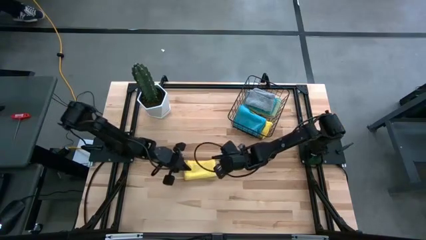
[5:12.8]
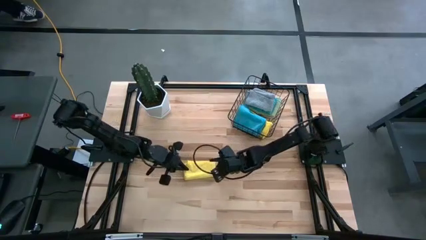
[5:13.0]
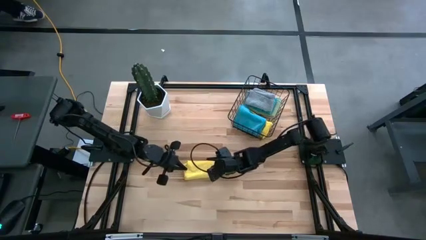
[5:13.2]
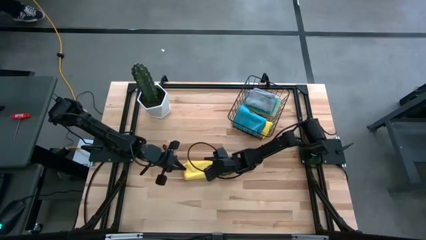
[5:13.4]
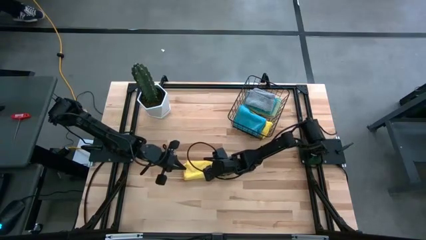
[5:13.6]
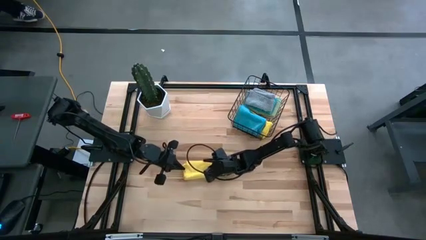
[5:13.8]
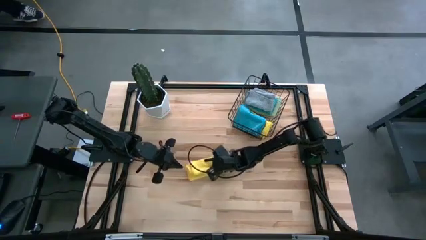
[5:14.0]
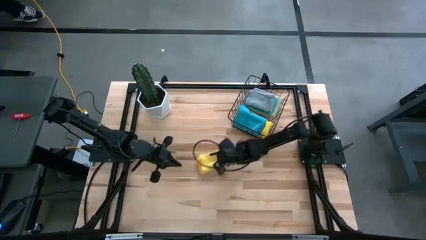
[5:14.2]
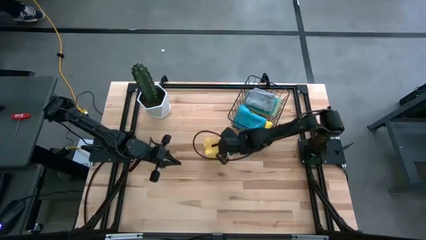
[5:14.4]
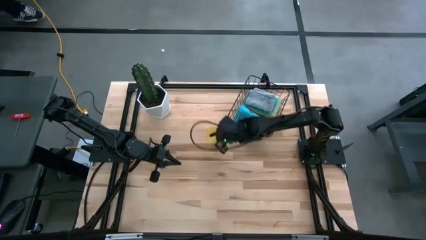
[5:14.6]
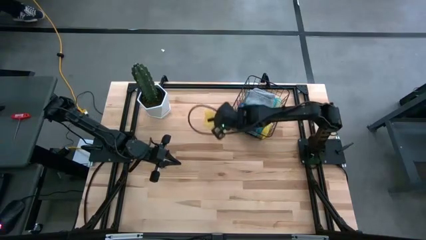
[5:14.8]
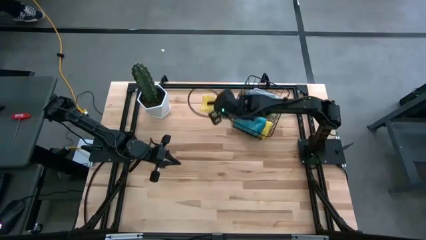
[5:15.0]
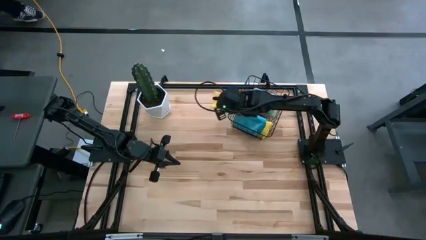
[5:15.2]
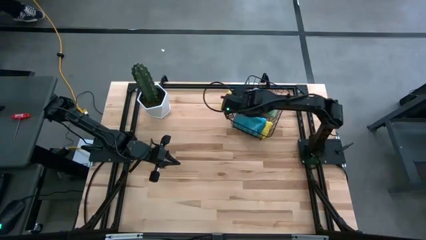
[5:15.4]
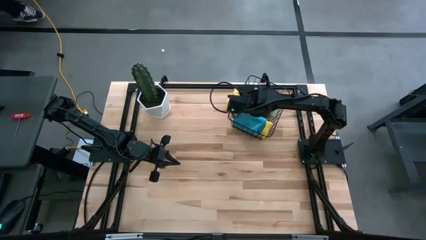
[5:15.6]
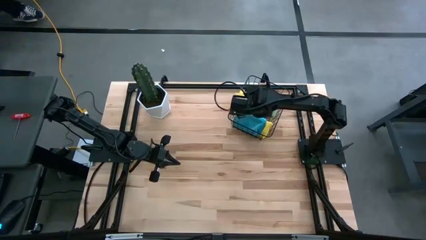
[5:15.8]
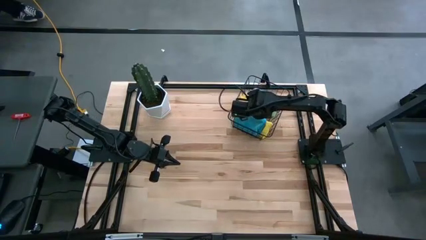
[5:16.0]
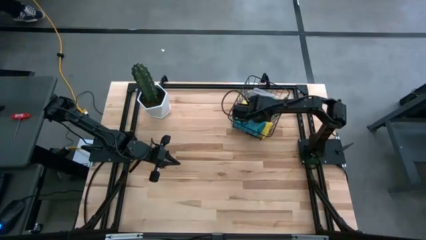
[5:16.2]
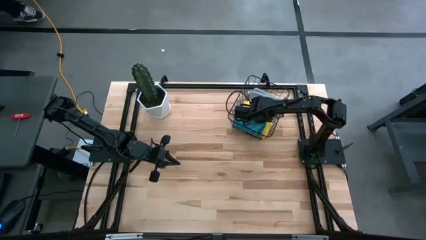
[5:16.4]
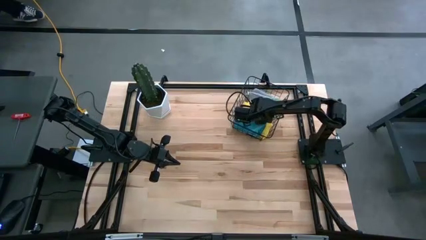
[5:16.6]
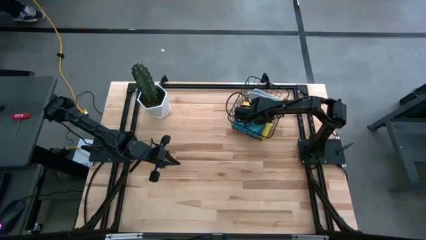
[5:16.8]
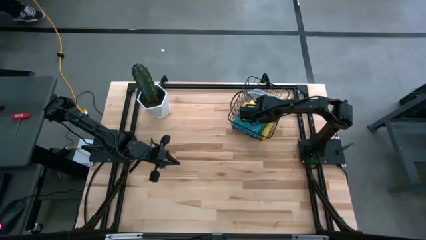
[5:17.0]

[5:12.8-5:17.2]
Task: Fold microfiber towels
Put the folded yellow microfiber towel into the black wire basket

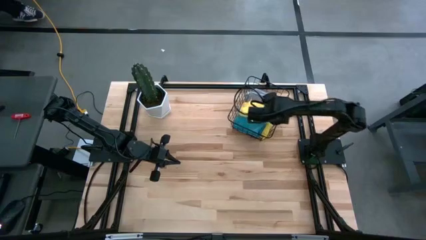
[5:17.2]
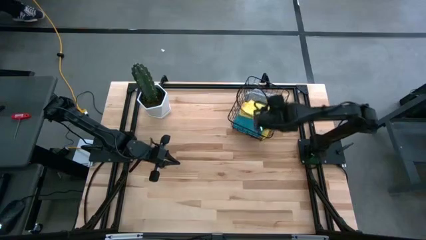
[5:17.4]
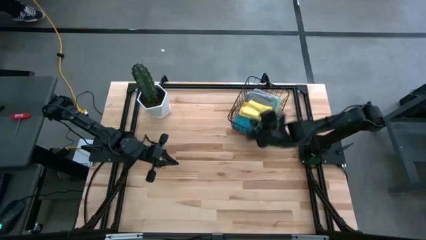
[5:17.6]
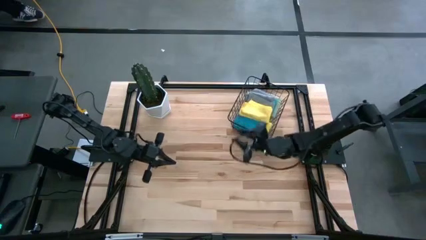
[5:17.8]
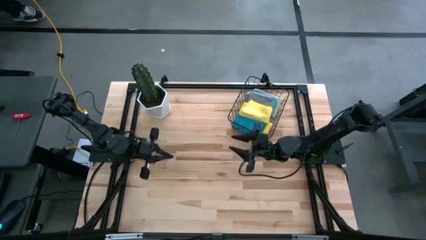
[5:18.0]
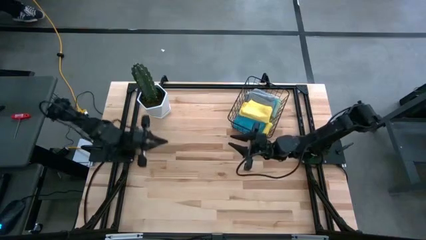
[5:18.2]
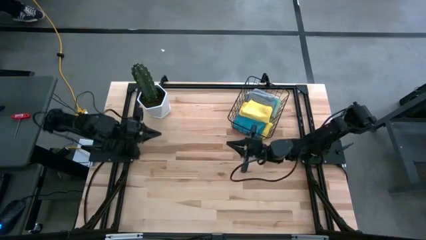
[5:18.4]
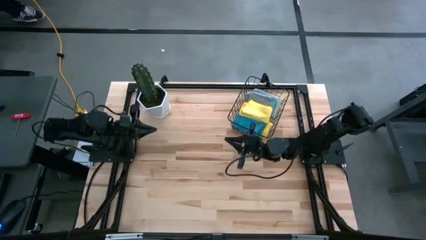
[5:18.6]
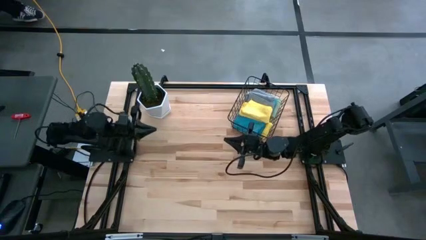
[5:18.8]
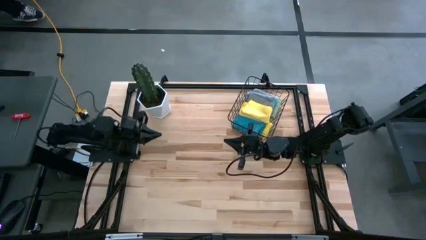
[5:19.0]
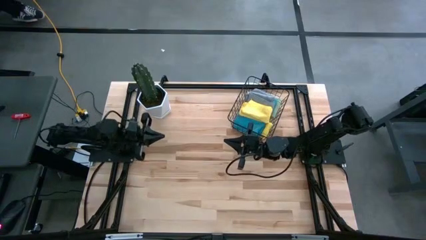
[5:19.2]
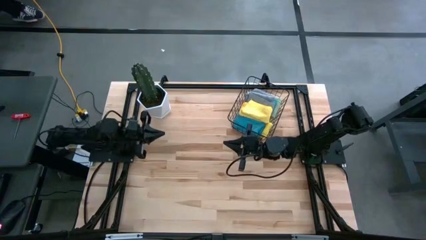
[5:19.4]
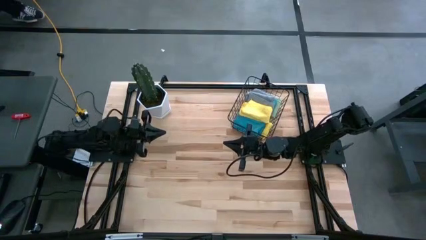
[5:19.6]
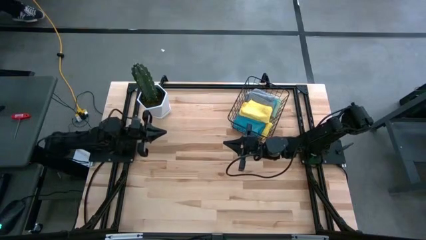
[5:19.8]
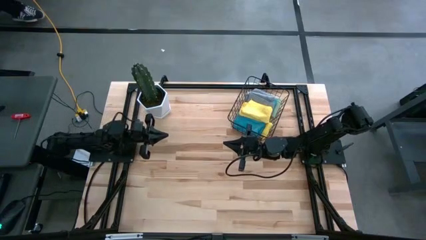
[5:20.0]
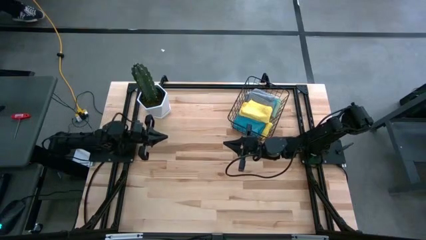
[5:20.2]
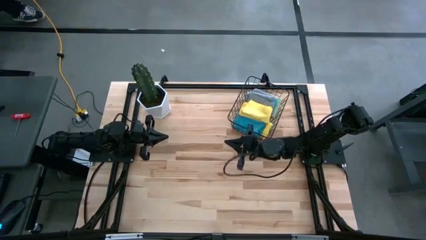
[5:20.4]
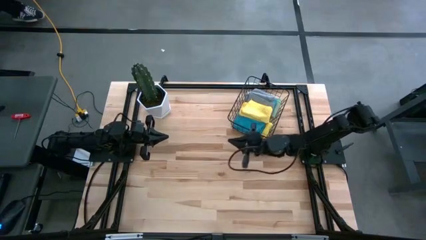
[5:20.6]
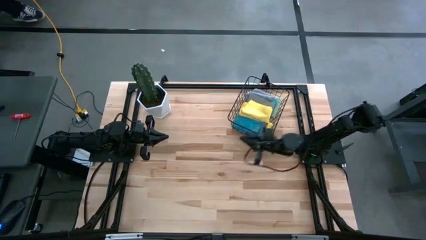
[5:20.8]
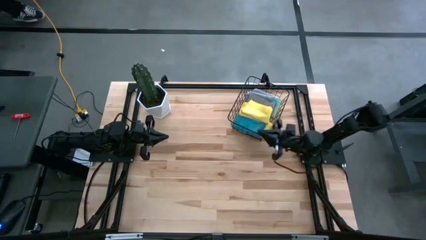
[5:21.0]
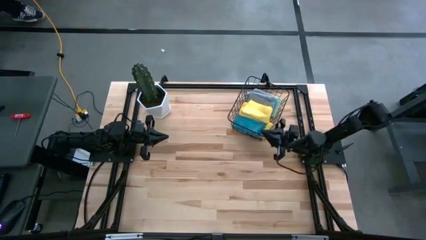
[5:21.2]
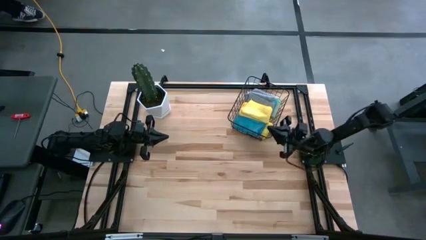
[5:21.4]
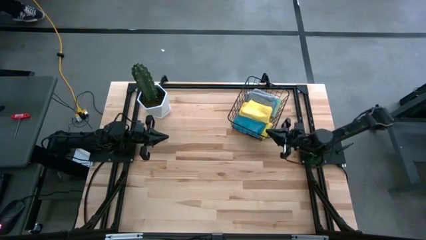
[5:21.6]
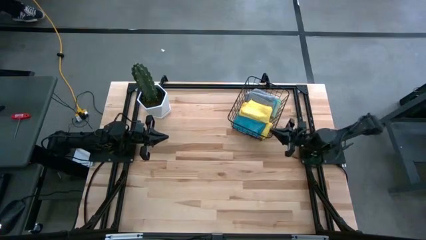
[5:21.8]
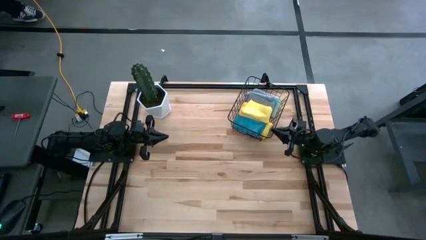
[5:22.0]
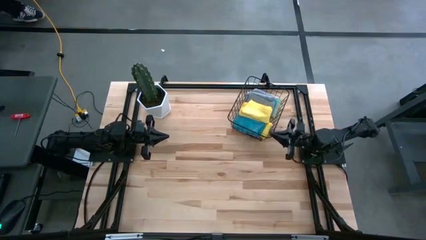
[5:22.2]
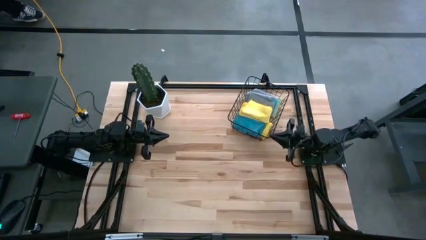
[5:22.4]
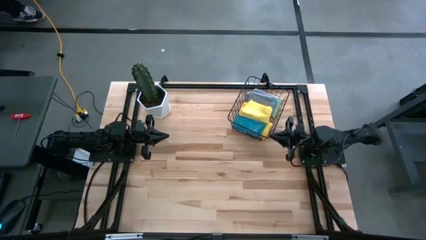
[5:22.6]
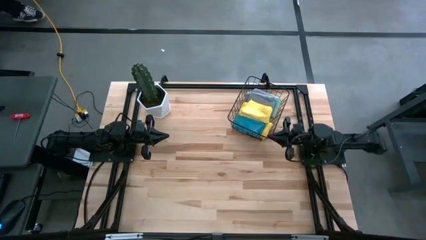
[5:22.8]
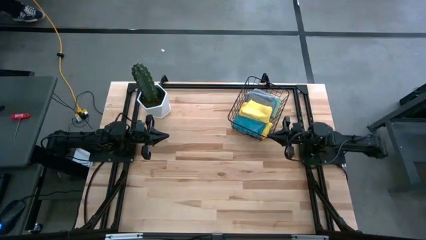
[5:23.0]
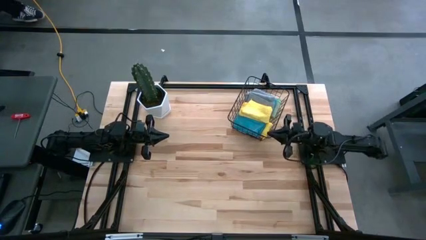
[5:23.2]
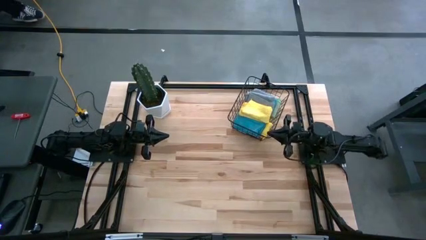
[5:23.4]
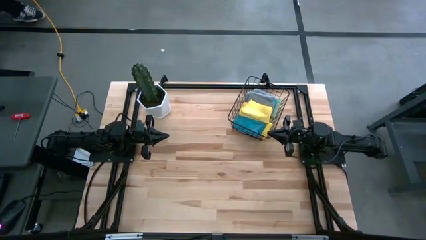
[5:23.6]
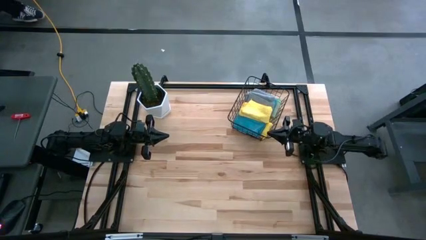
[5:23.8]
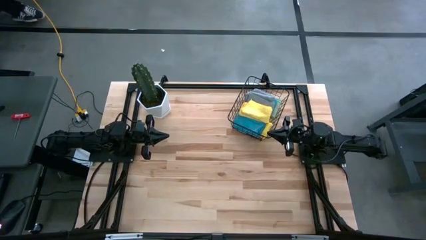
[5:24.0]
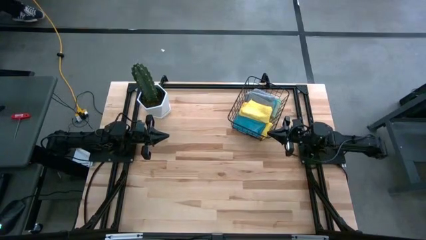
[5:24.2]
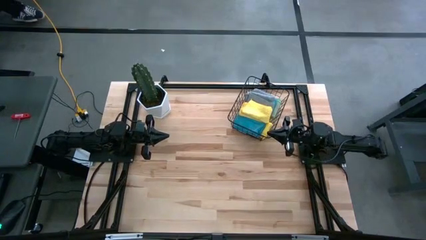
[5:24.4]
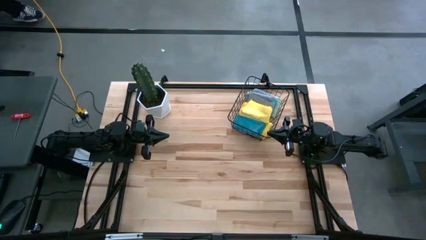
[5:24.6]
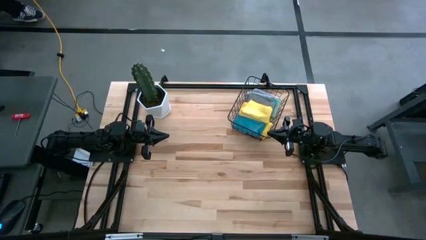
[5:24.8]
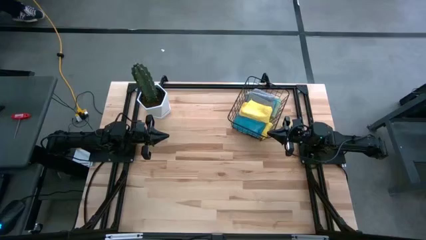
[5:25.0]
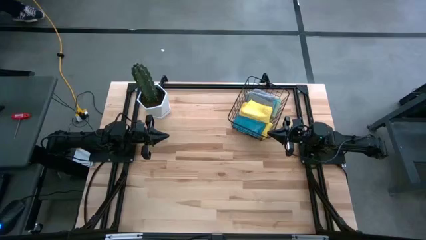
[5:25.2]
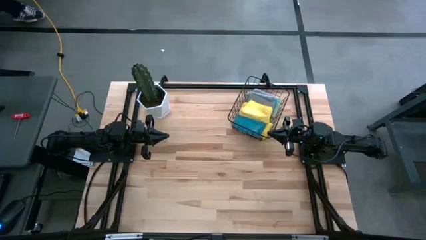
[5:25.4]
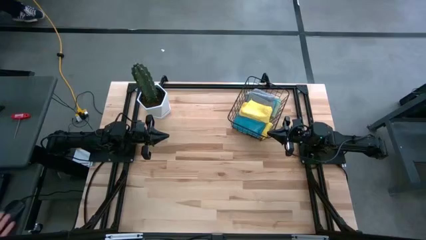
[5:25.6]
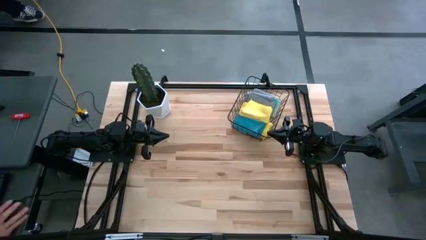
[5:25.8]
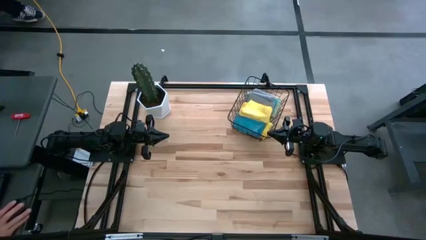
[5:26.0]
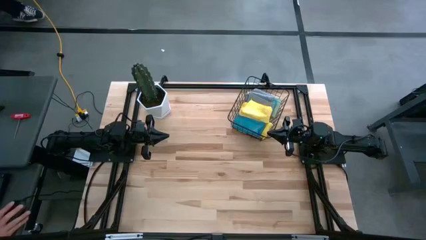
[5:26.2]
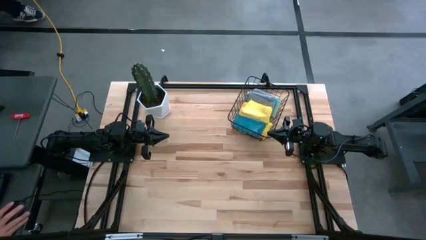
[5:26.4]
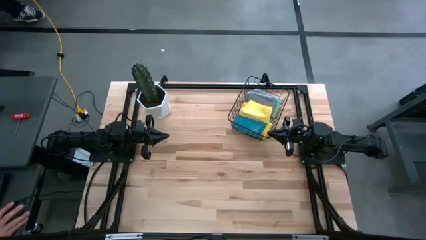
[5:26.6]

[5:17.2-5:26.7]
Return to Home Position
